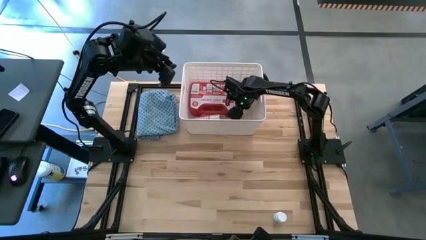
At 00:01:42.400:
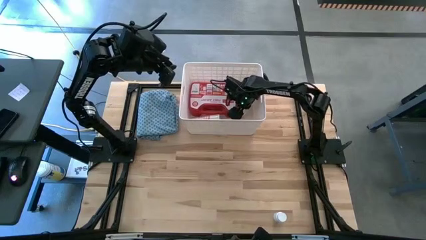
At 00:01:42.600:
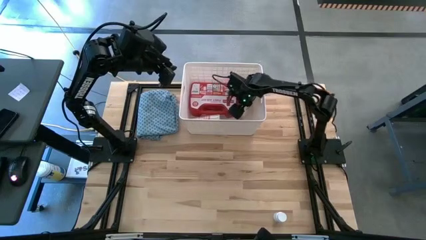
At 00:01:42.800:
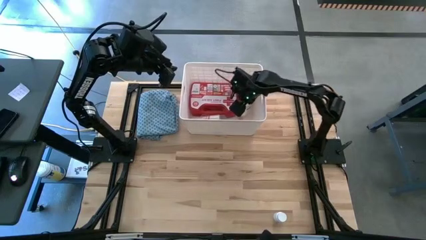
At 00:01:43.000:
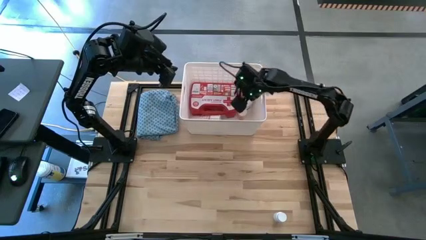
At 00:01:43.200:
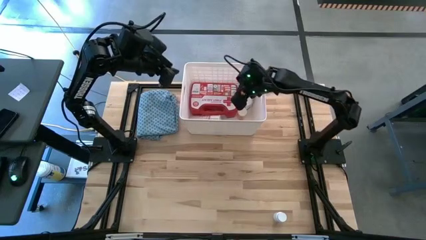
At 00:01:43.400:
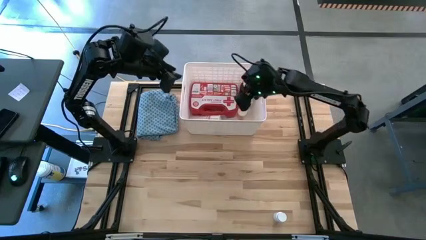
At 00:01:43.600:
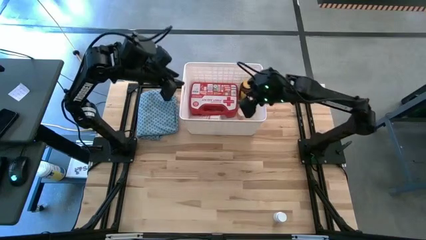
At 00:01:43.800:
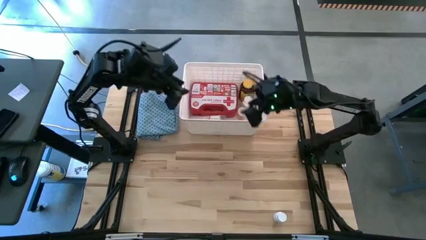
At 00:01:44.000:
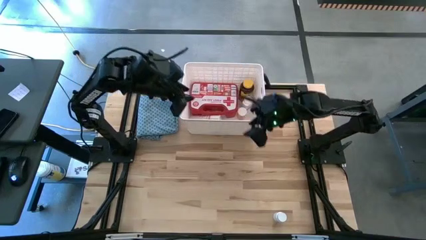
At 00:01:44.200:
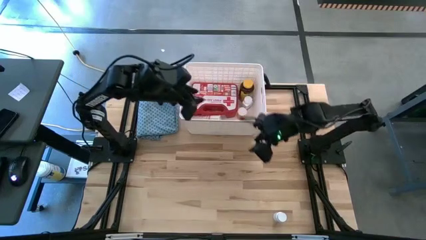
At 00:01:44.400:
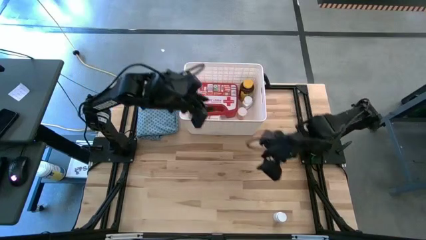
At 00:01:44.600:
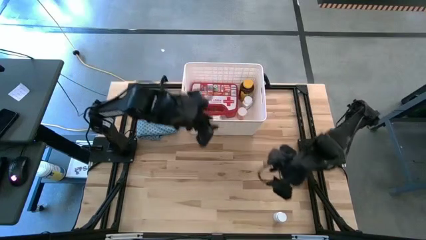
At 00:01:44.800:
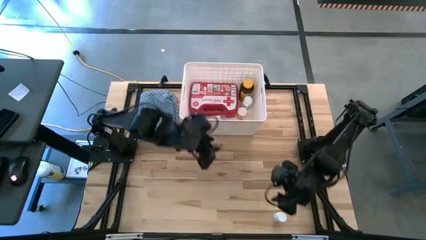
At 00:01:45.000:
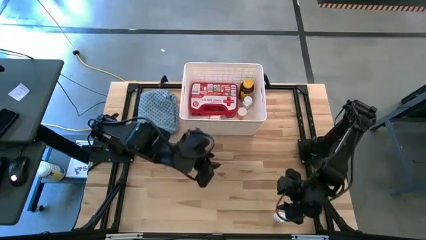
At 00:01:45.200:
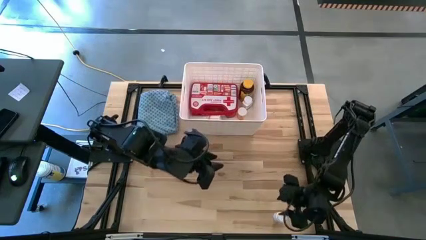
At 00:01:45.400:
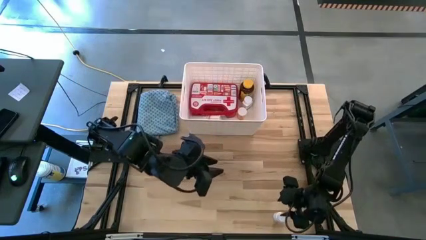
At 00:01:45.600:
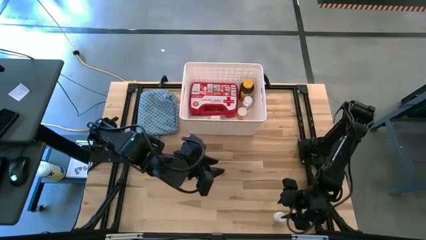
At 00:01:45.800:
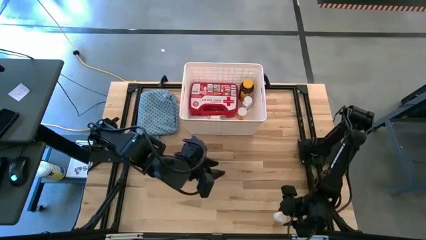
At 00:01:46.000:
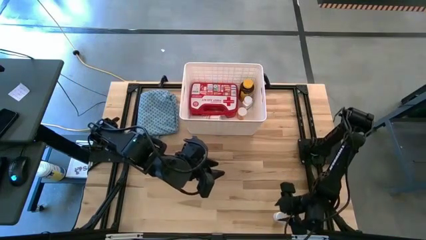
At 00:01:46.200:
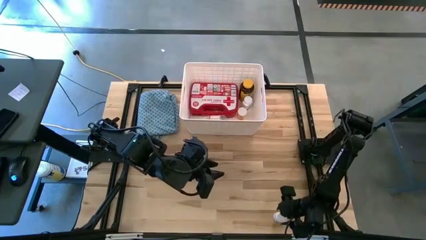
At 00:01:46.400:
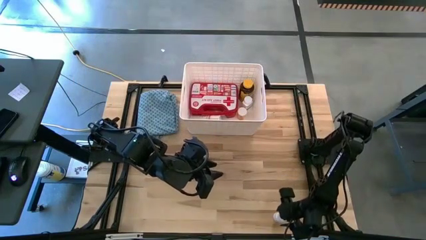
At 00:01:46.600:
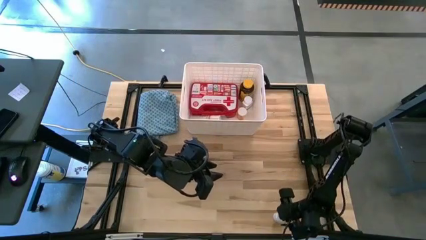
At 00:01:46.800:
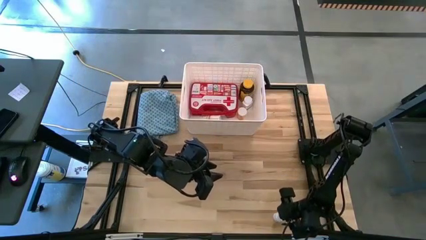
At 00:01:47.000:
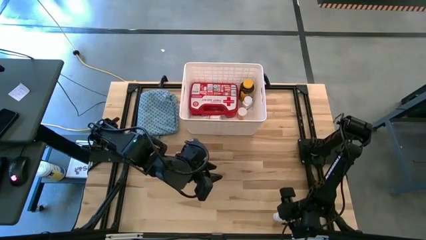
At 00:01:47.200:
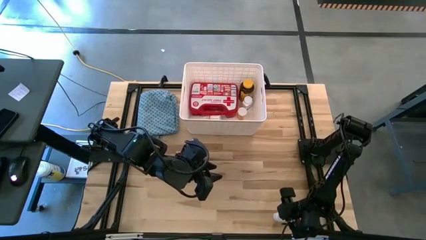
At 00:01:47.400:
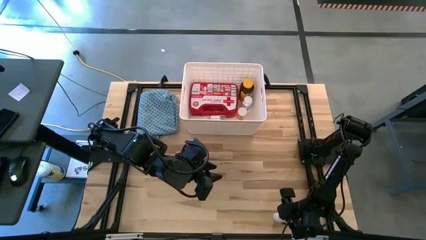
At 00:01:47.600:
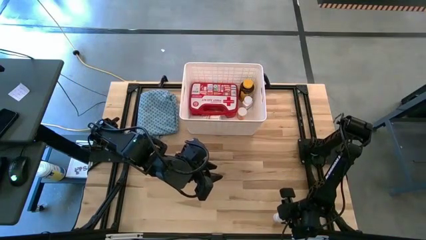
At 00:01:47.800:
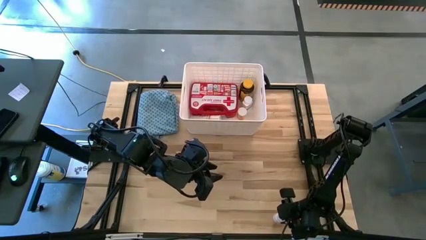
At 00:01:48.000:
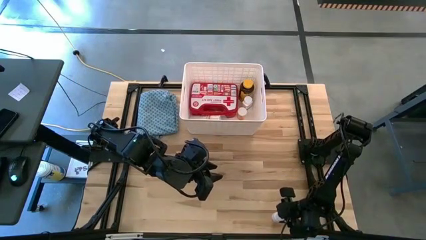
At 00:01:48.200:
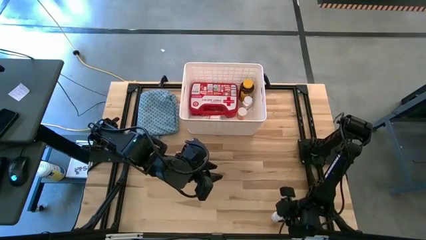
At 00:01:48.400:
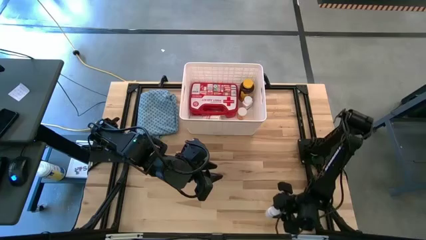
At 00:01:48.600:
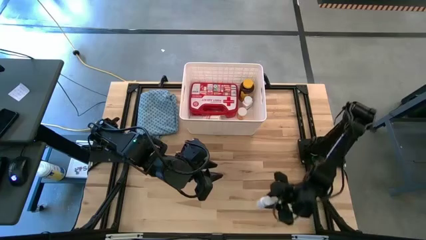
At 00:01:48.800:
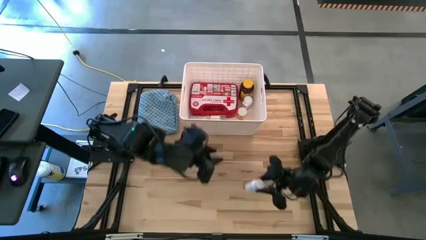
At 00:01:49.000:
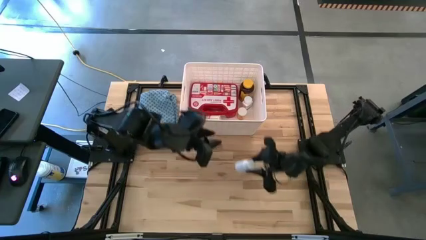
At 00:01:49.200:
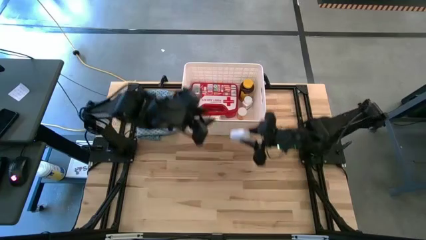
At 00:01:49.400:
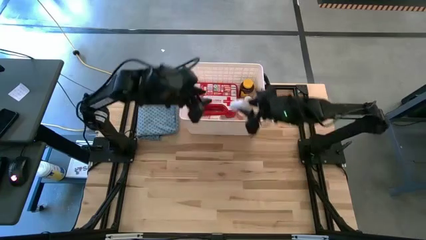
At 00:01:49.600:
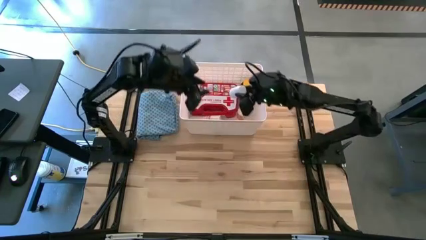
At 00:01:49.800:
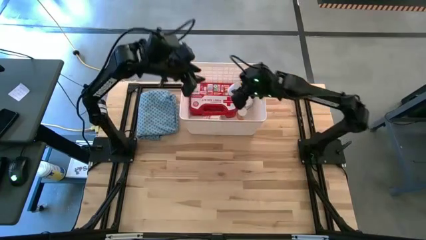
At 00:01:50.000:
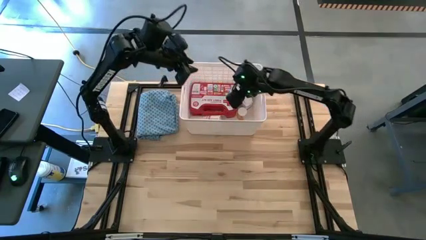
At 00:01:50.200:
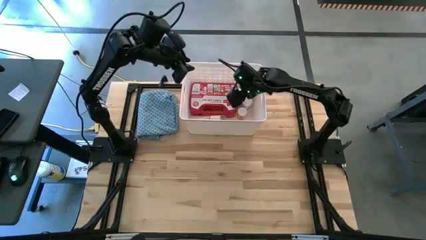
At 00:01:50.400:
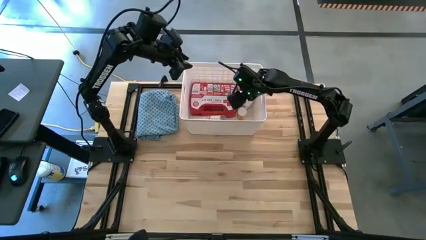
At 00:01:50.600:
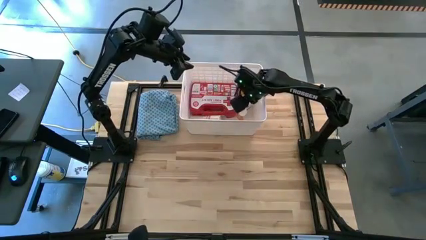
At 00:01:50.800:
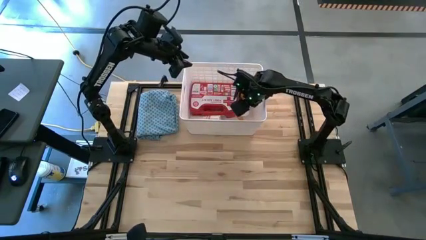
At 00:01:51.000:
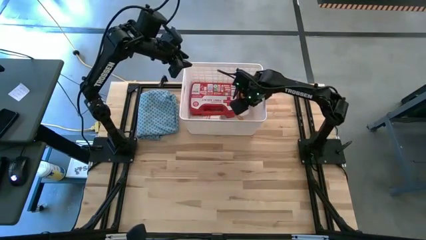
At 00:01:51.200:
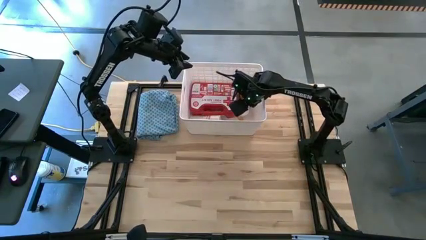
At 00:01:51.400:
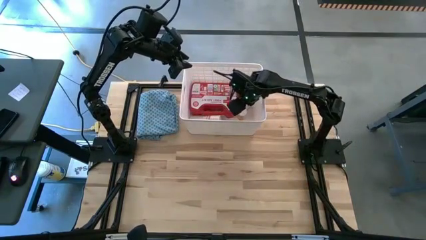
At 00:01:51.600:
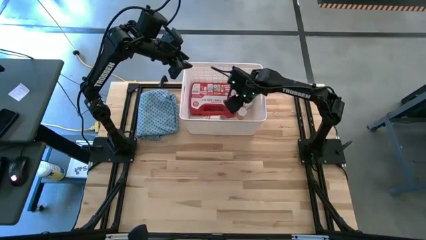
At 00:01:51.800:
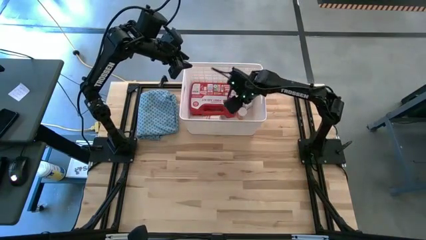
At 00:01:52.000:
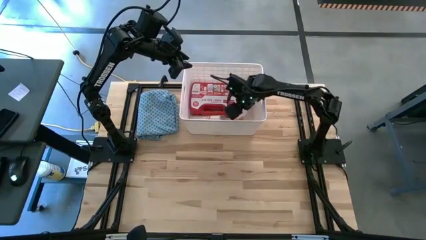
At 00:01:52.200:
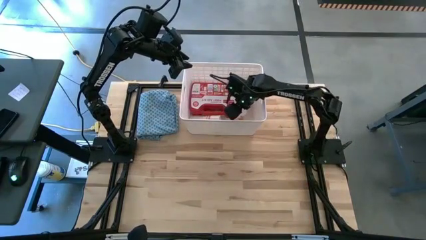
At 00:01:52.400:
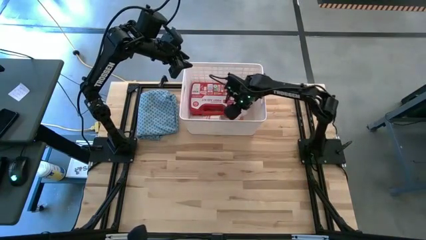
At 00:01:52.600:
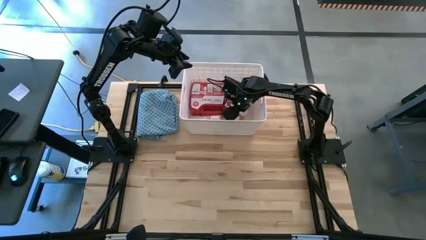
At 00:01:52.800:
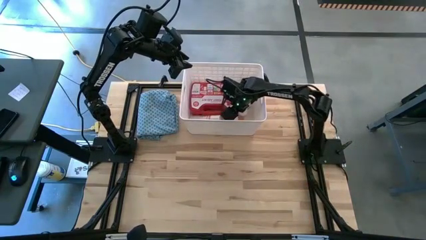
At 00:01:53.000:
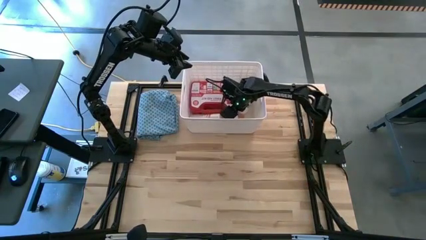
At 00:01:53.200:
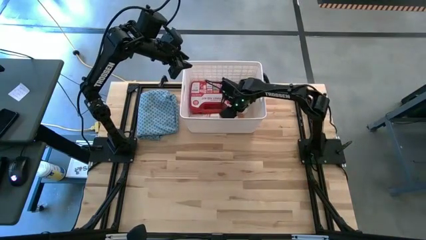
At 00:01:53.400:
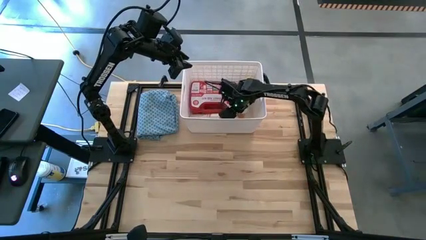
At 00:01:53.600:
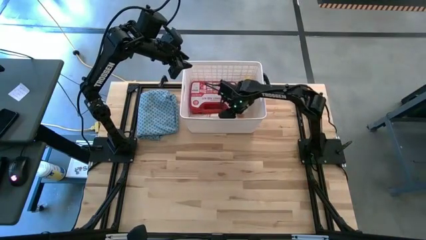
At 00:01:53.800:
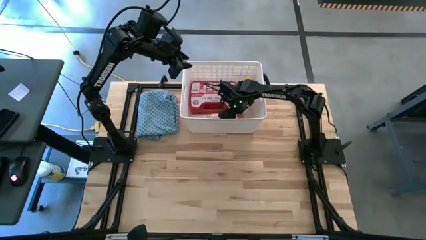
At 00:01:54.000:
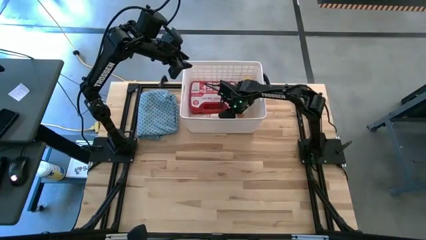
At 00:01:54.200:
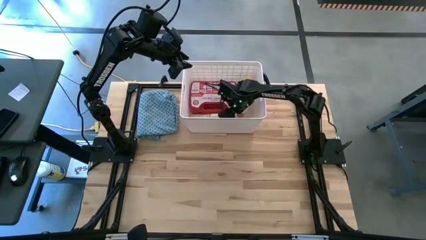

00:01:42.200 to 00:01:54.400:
Task: Pick & place medical supplies in basket/bin
Put the white pill bottle into the white bin

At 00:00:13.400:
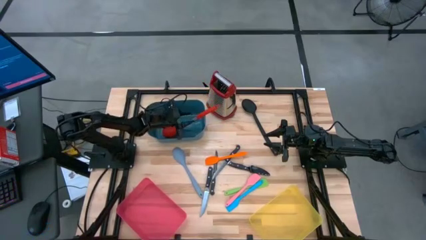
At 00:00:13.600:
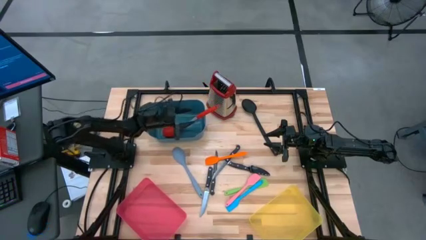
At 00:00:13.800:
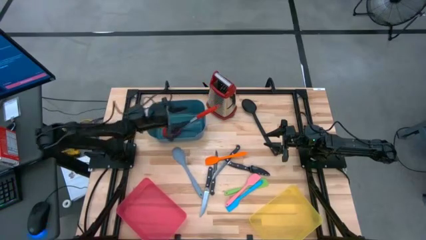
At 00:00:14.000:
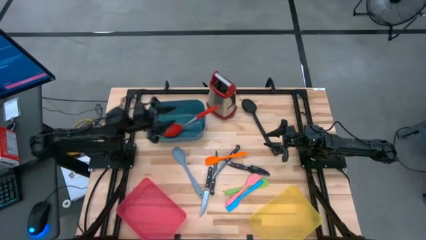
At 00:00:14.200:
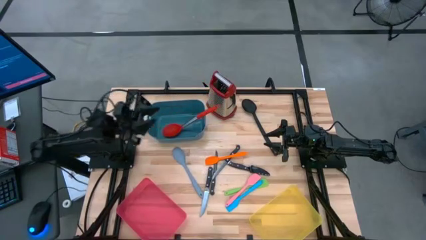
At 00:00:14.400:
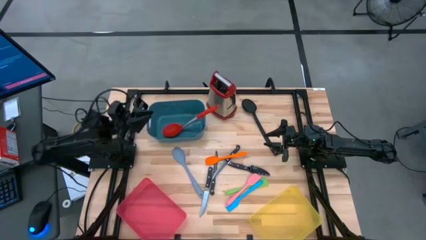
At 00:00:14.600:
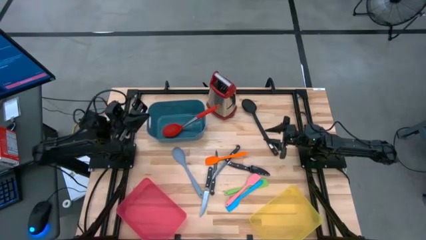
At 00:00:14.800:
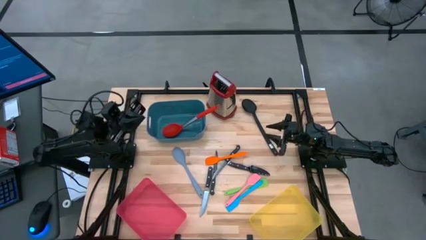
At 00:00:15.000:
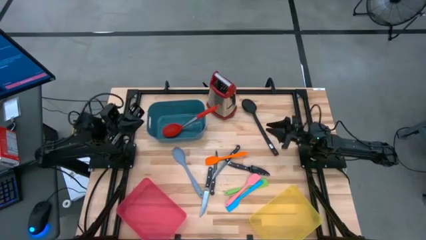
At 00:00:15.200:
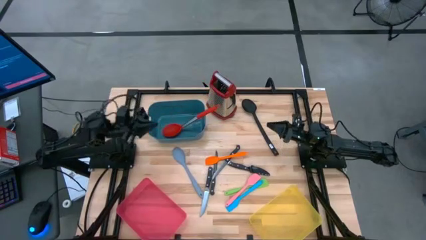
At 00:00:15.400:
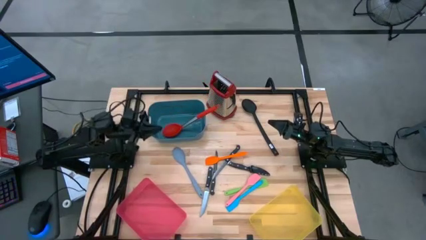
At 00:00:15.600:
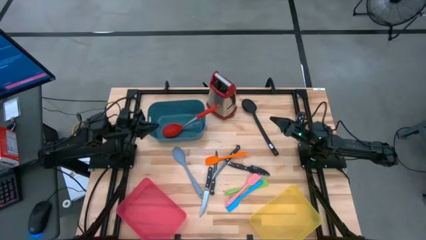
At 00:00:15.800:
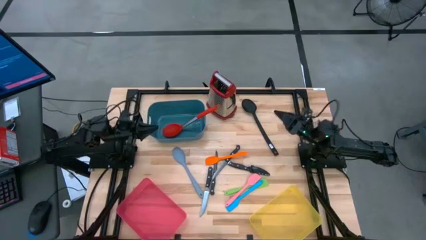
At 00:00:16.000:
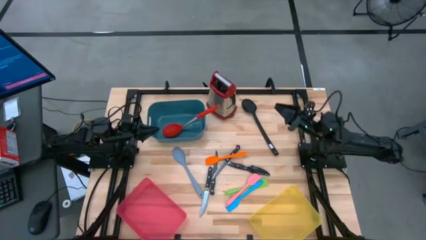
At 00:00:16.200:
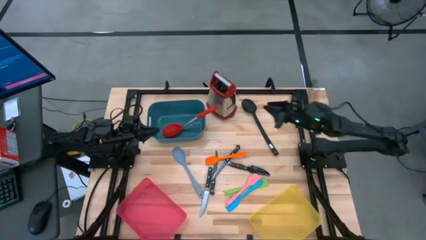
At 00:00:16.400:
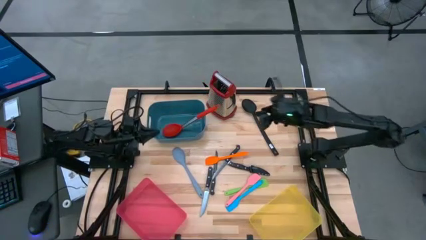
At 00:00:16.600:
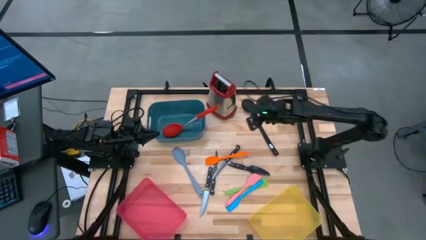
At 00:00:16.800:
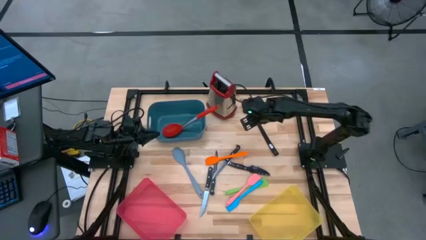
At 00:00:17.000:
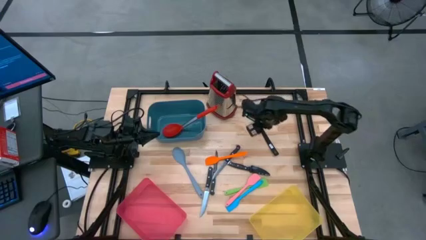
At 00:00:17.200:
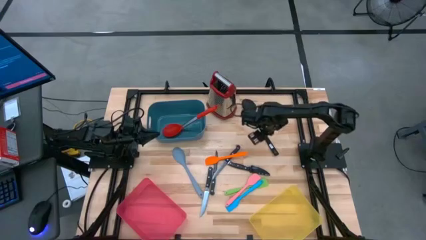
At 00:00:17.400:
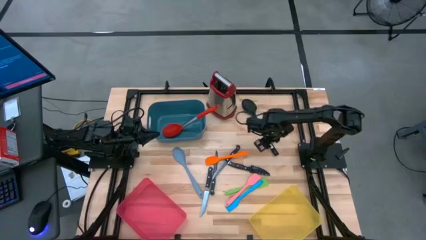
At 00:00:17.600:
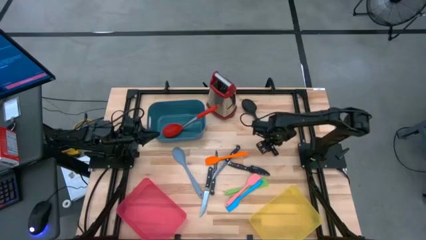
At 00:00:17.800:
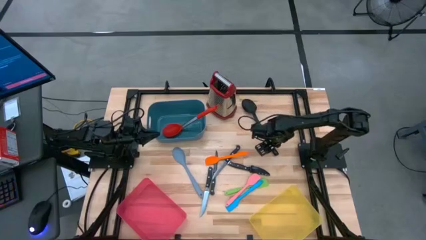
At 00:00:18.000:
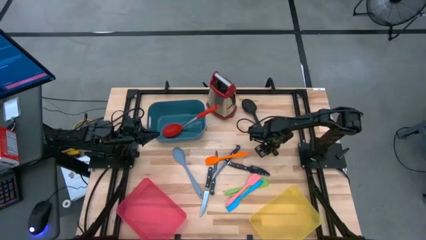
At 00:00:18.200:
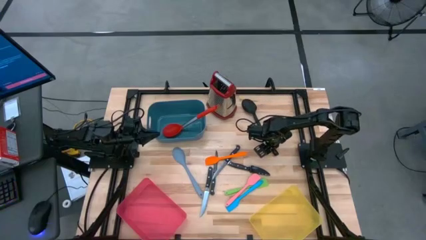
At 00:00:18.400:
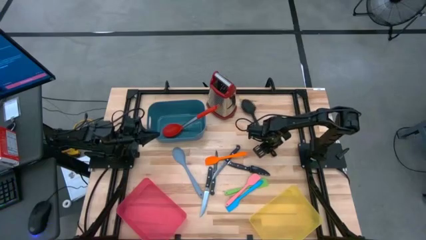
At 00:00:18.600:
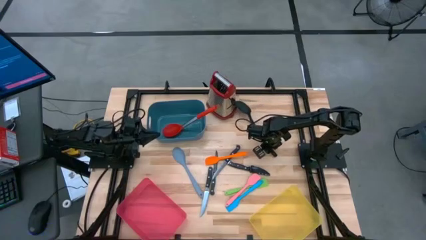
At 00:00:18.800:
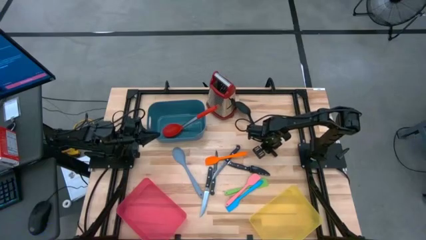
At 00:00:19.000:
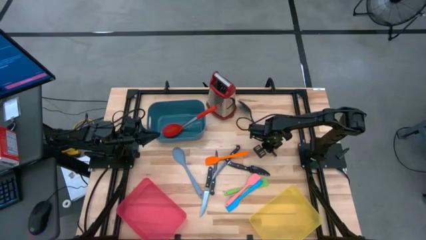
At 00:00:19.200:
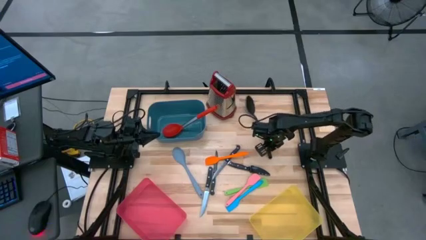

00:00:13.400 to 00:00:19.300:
Task: Pick & Place Kitchen Items
Put the black serving spoon into the blue bin
